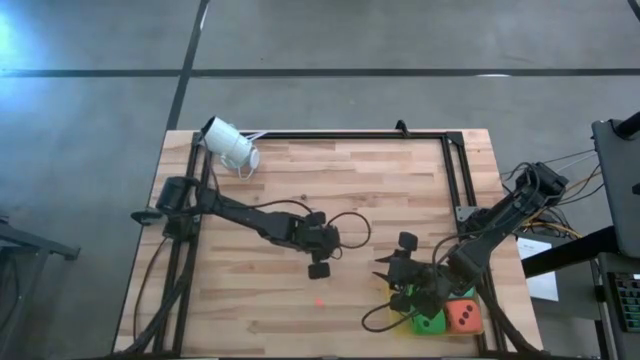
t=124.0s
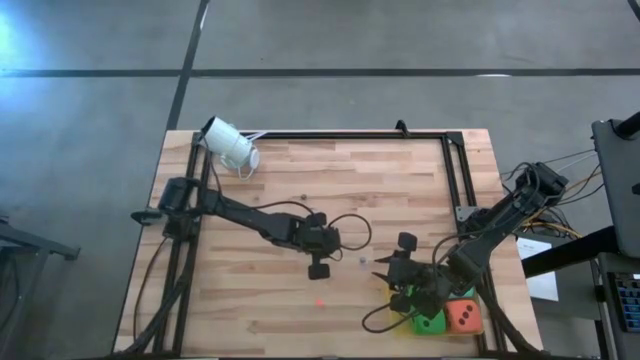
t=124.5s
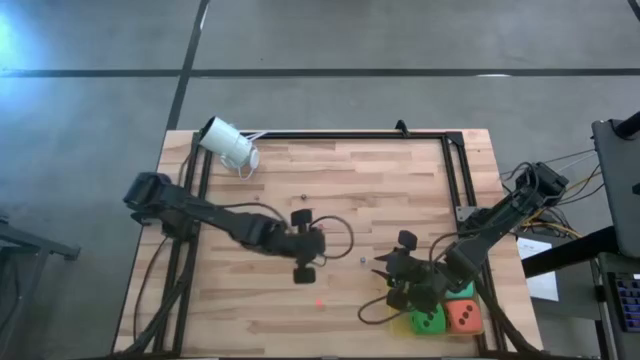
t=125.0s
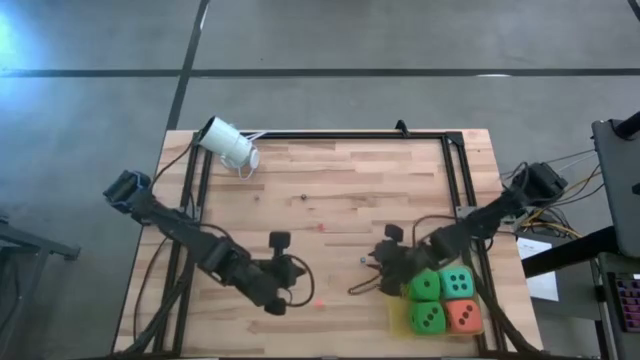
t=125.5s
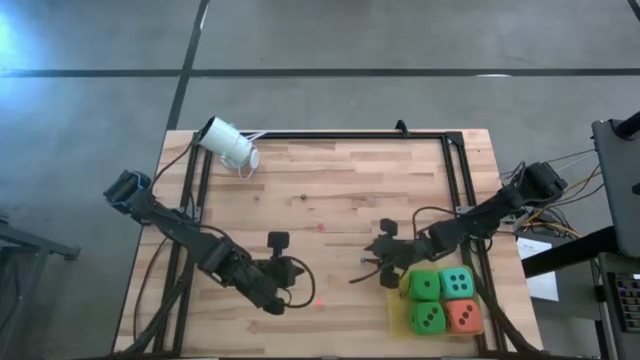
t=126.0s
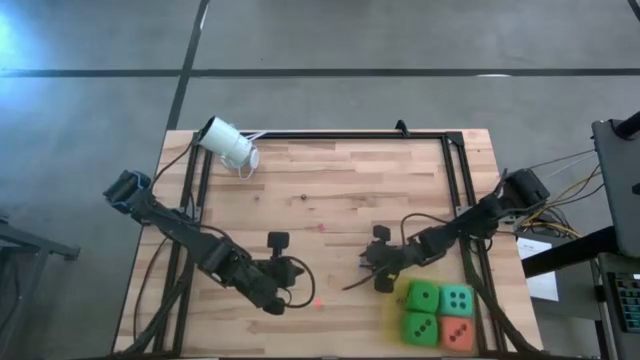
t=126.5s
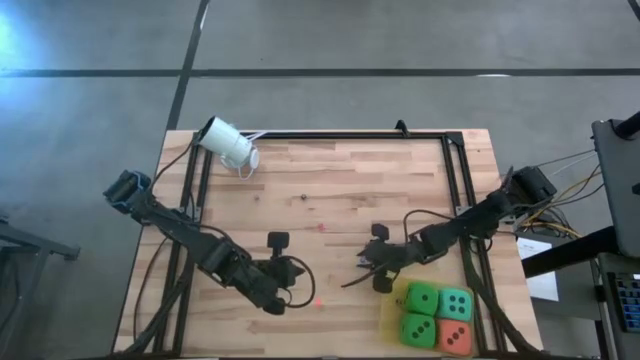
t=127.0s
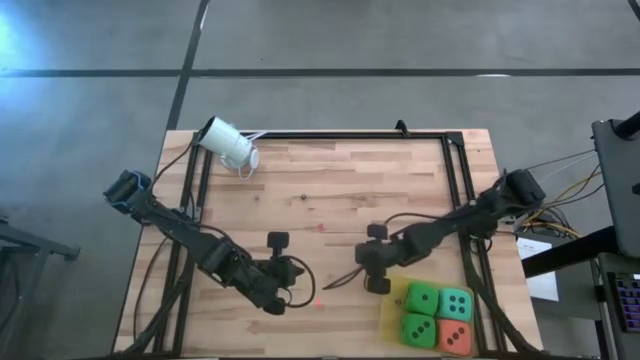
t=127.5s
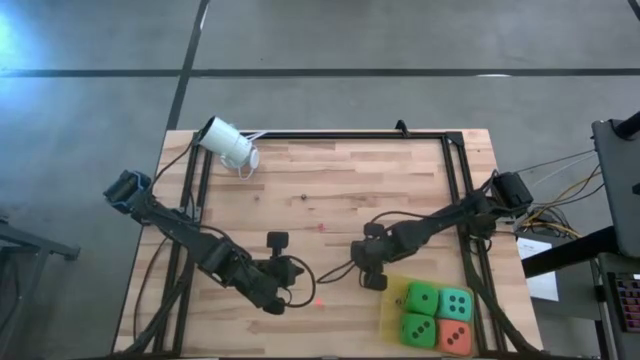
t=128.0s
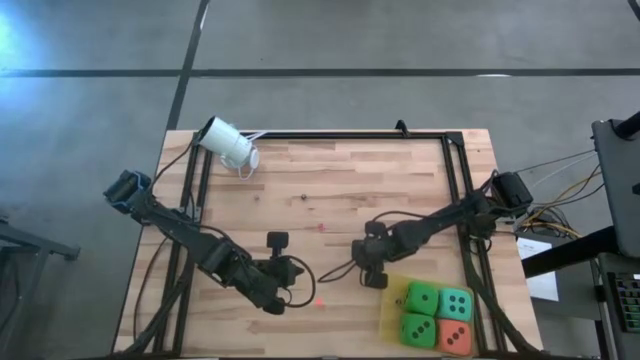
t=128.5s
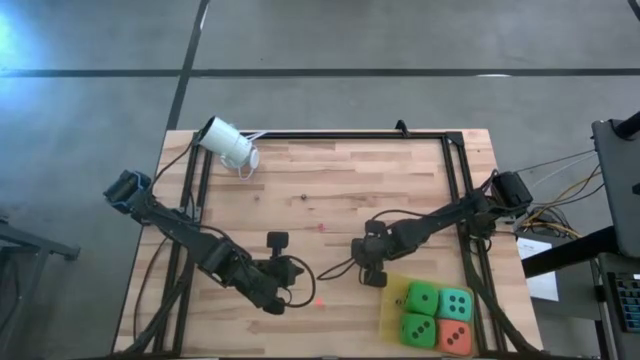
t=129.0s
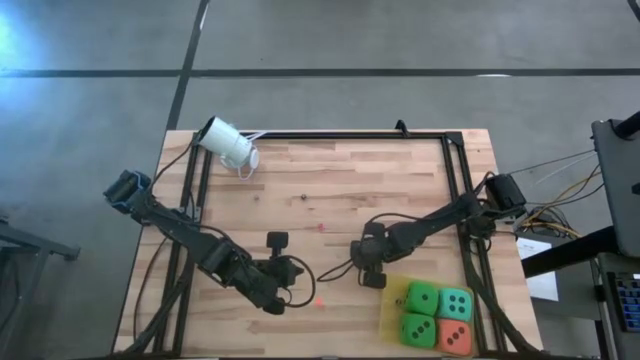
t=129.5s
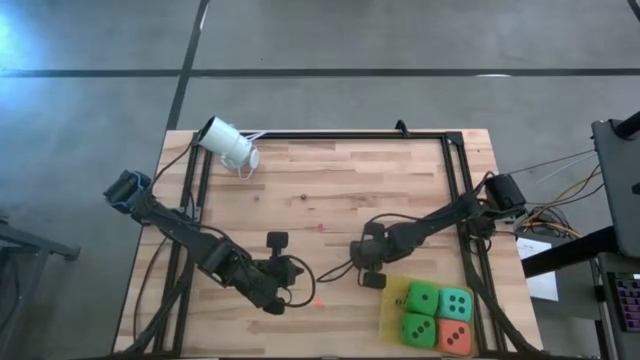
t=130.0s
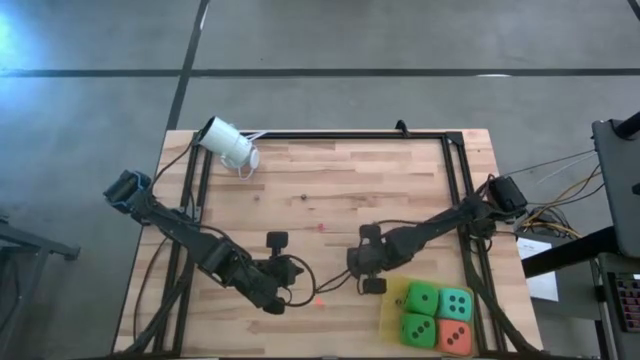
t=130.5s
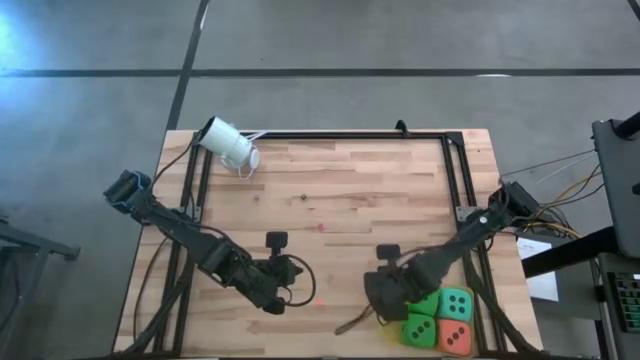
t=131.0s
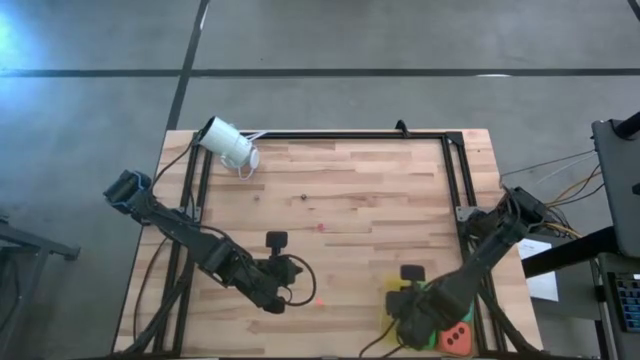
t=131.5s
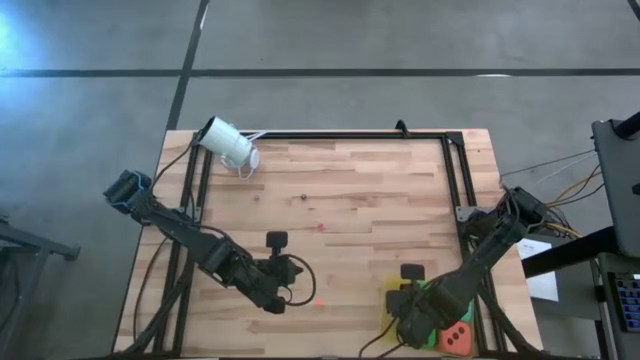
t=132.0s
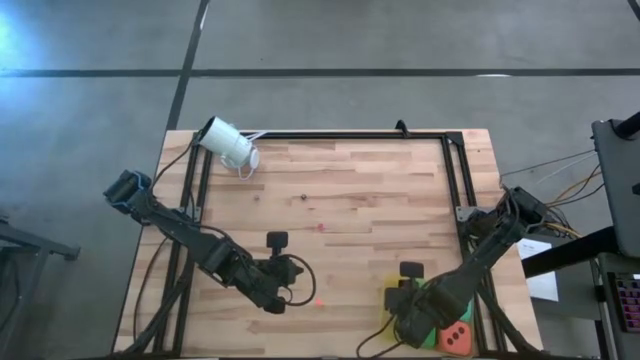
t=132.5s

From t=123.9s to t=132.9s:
Task: Pick & Place Dice
Put the small blue die into the yellow bin

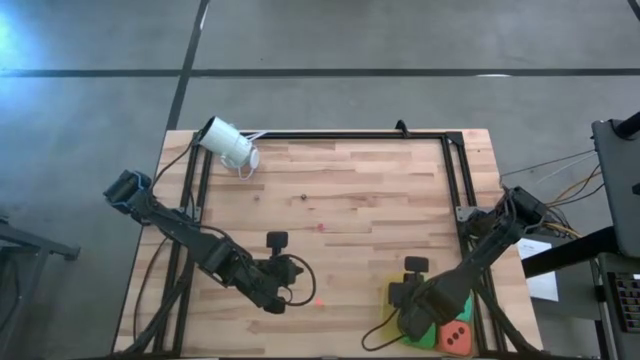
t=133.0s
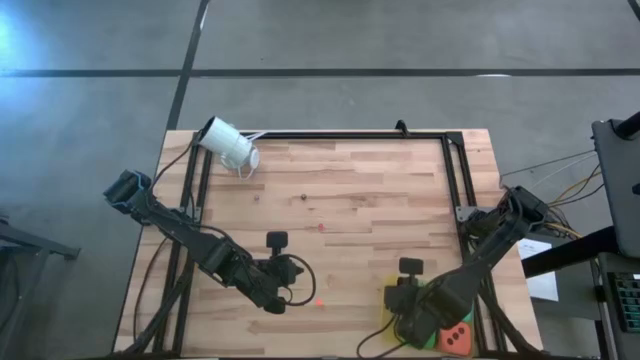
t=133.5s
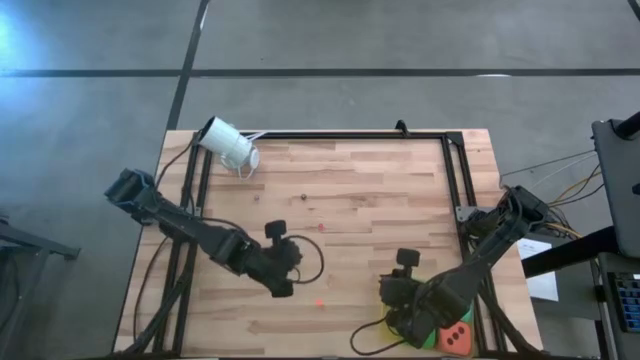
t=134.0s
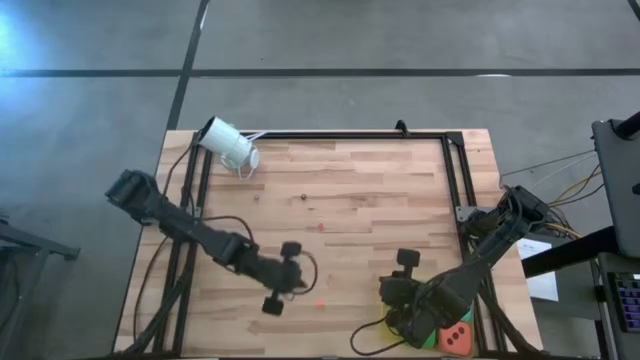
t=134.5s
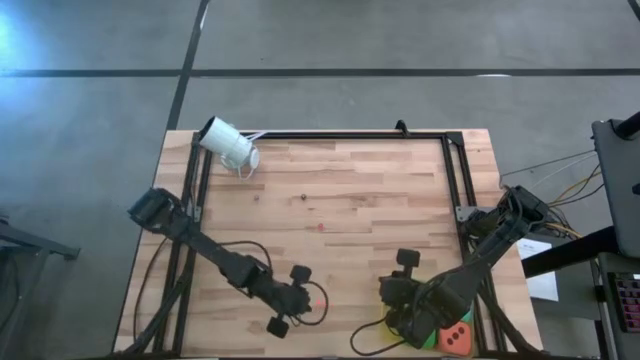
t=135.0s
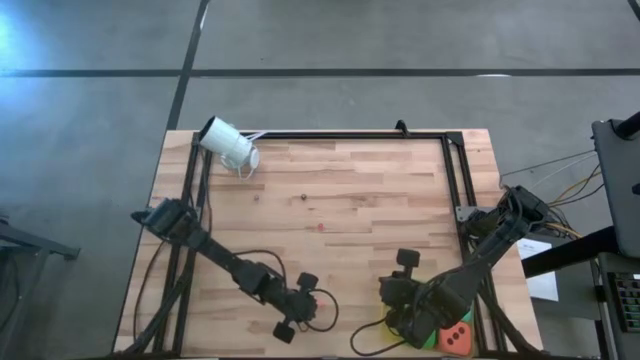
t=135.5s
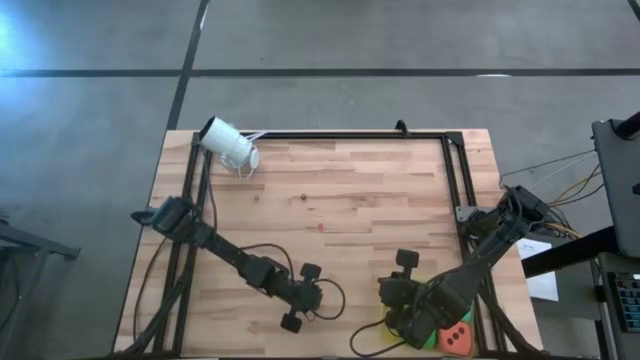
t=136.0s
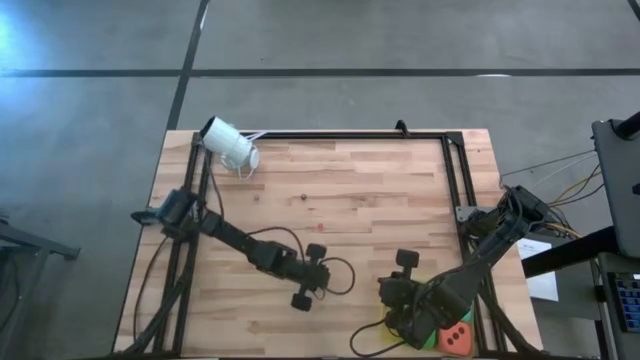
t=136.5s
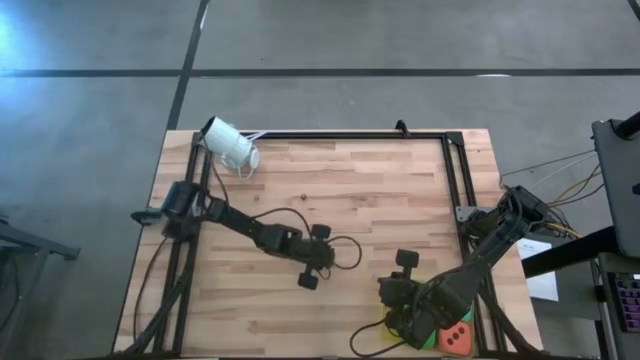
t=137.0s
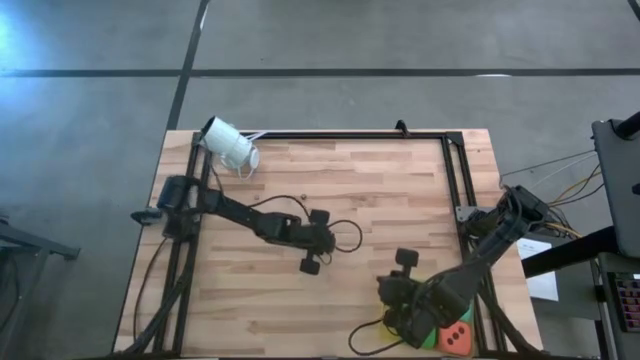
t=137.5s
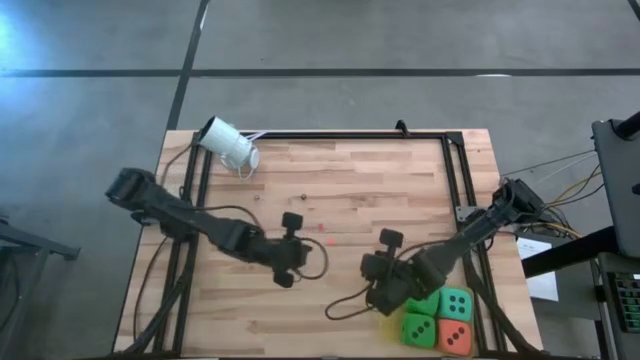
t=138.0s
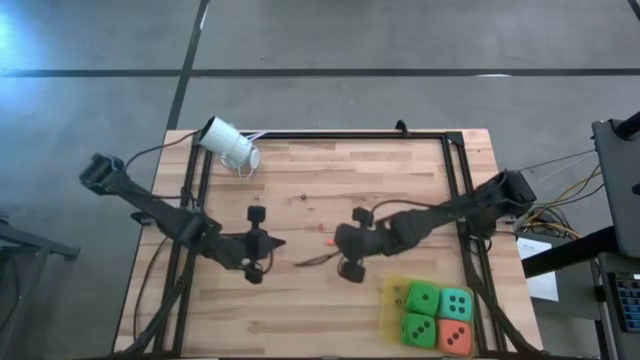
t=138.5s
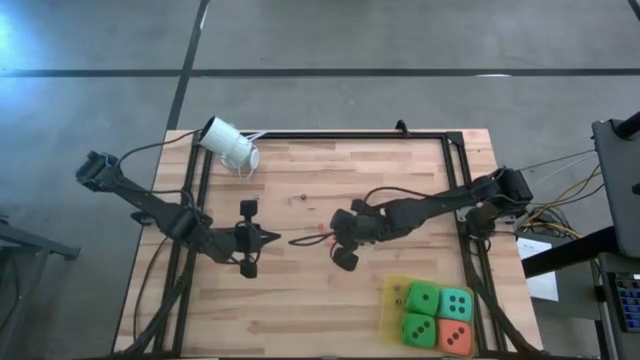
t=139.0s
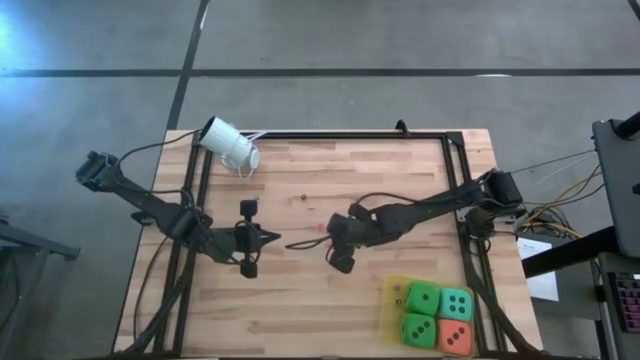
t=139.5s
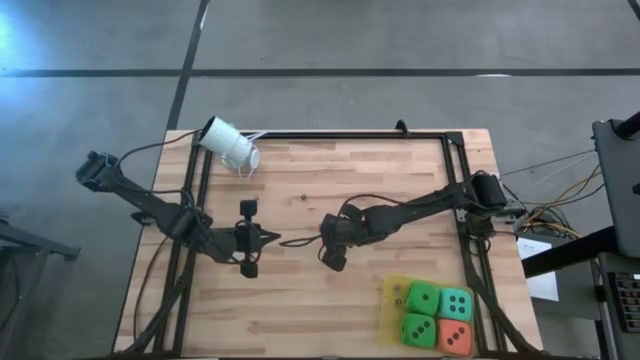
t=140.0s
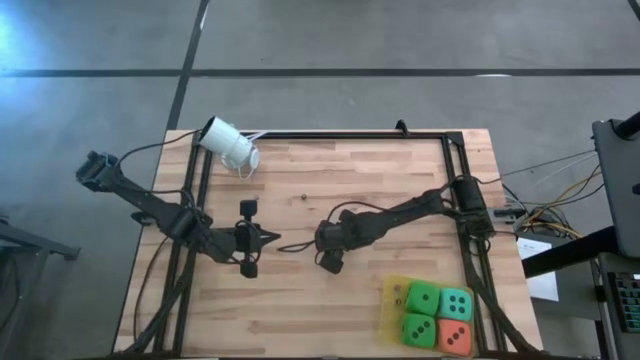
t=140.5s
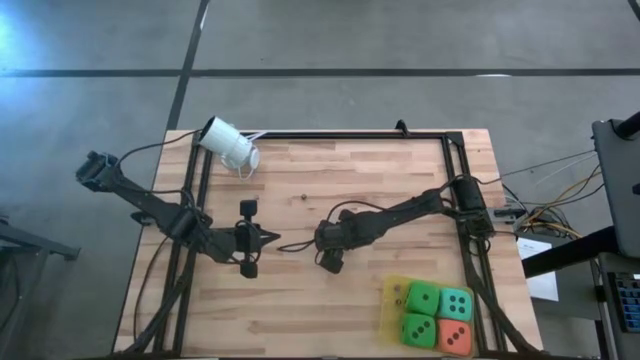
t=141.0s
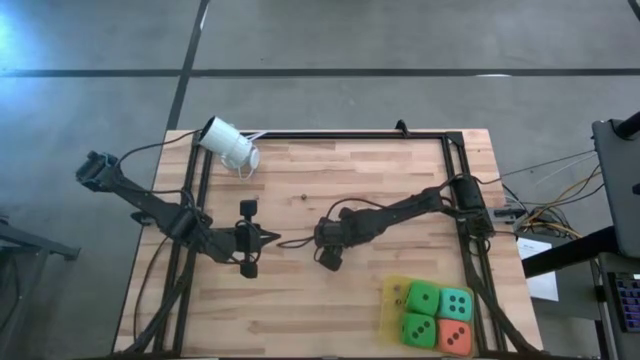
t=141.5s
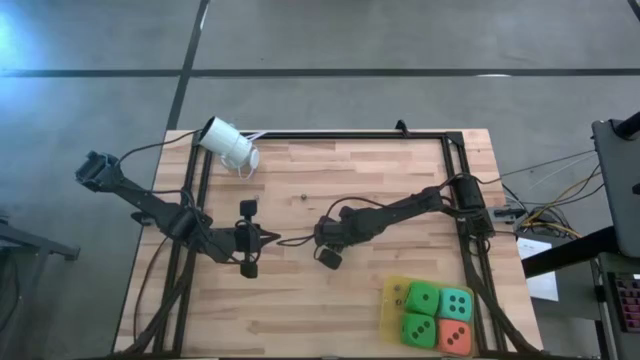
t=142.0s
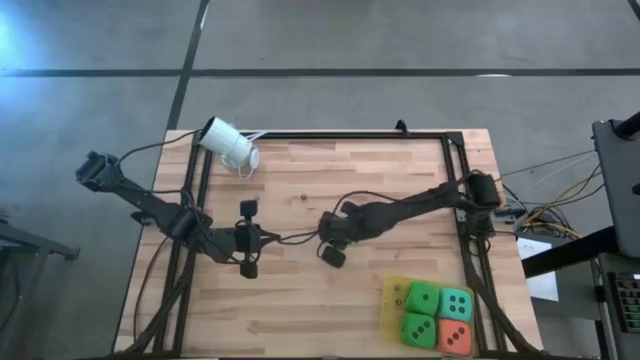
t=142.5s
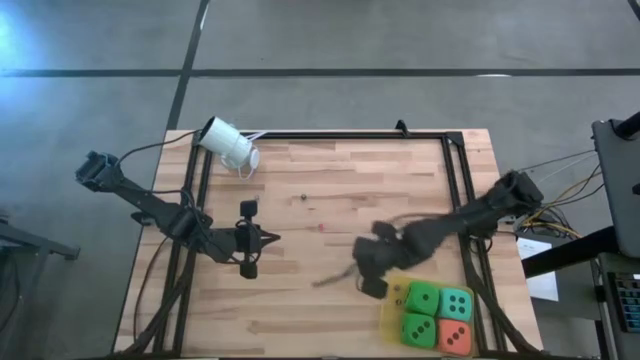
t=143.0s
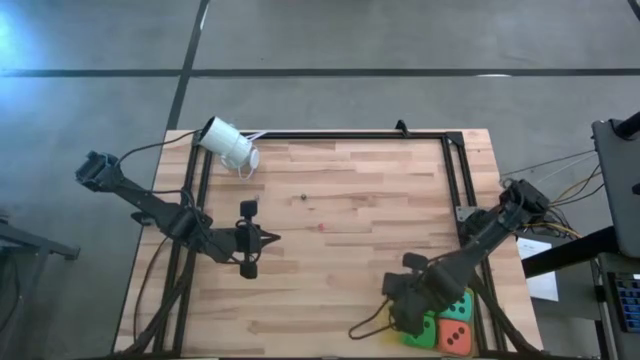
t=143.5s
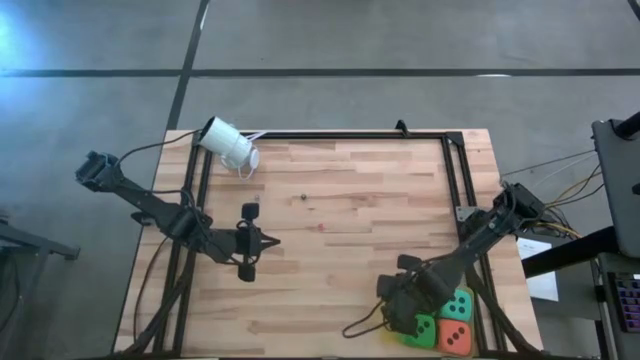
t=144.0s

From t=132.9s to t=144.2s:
Put the small orange die into the yellow bin

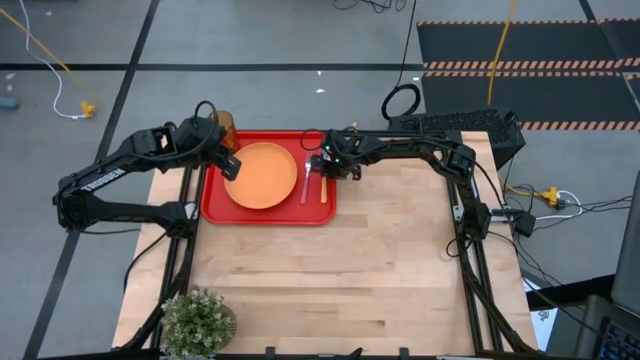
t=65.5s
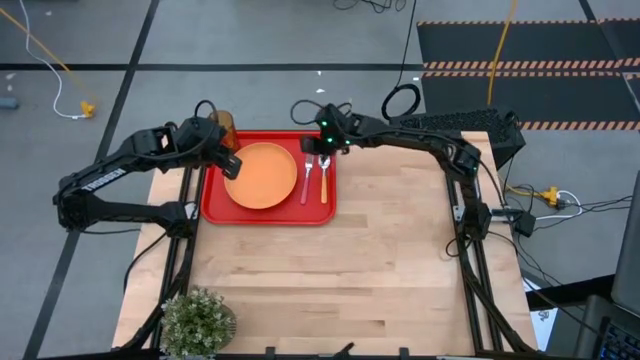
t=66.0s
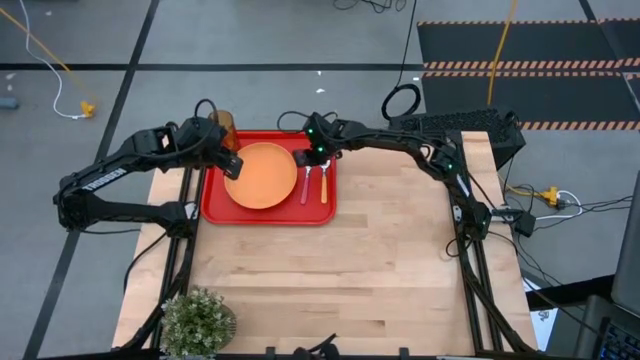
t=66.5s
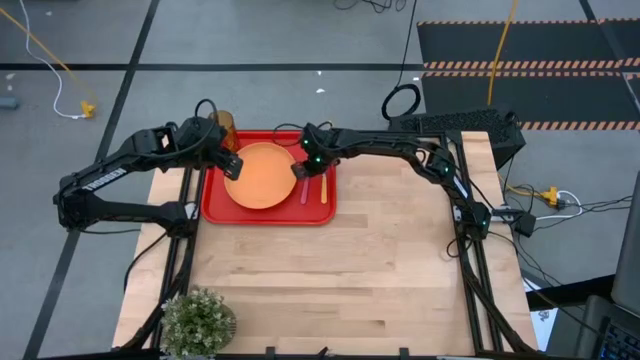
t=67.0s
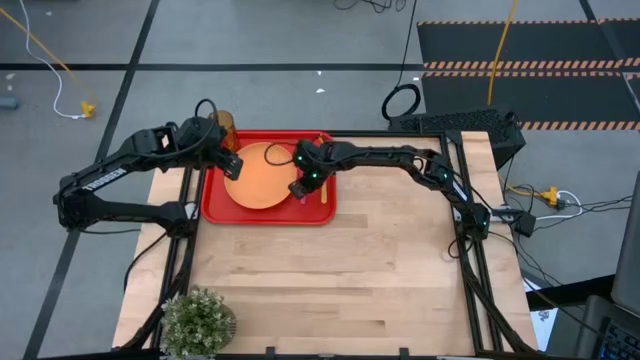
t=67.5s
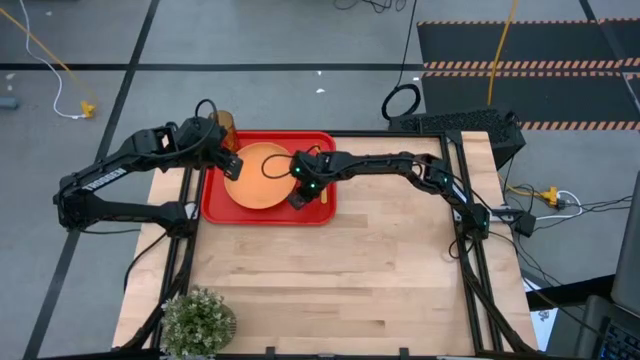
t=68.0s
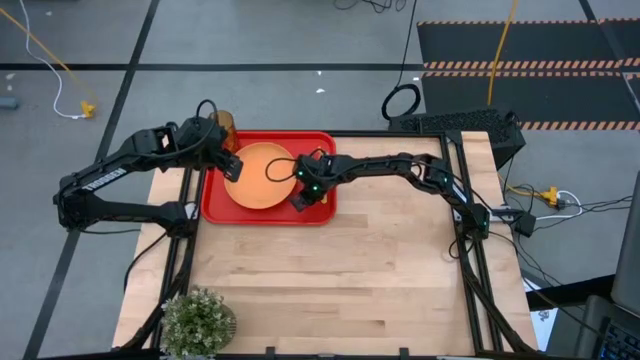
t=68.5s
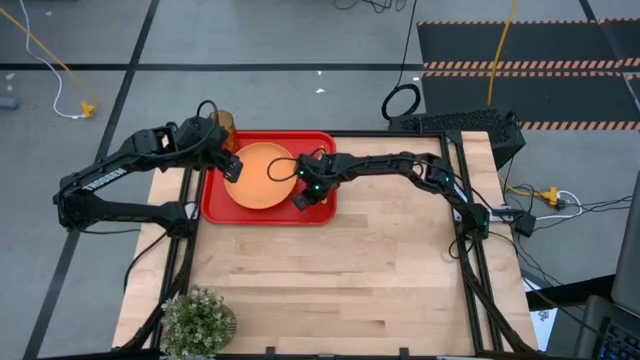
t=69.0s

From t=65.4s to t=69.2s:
Task: Pick and place plate/cup/fork/spoon on tray
Adjust the pink fork
